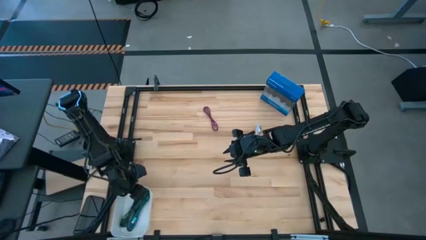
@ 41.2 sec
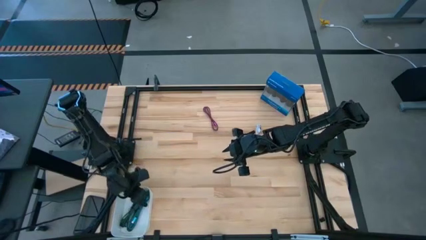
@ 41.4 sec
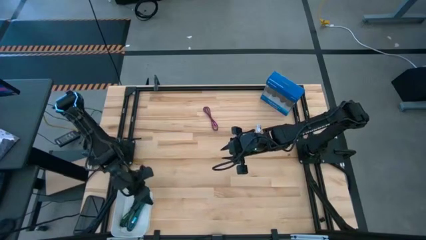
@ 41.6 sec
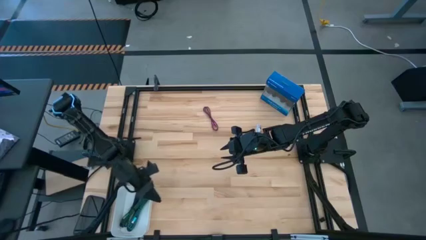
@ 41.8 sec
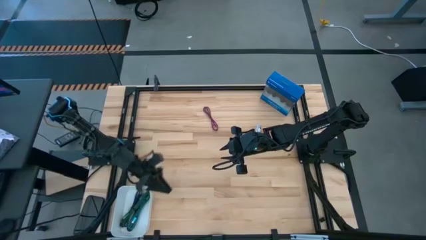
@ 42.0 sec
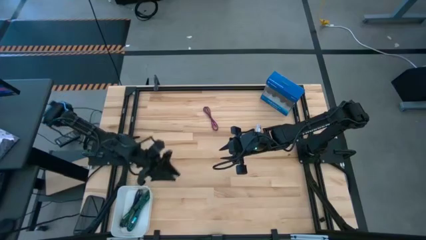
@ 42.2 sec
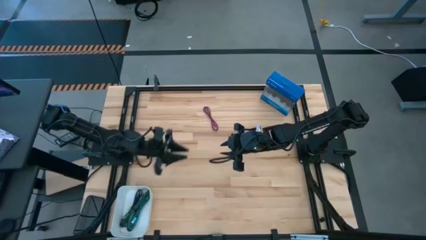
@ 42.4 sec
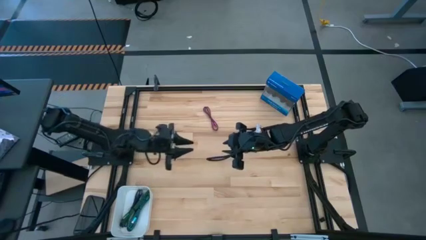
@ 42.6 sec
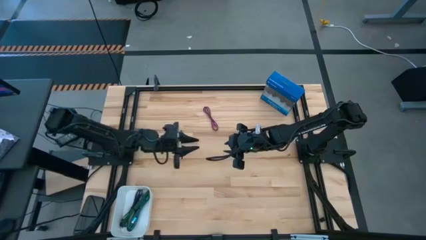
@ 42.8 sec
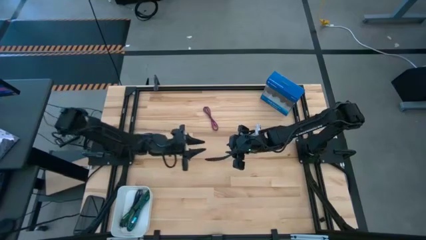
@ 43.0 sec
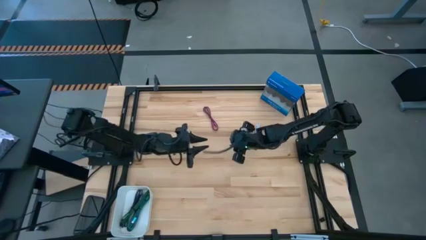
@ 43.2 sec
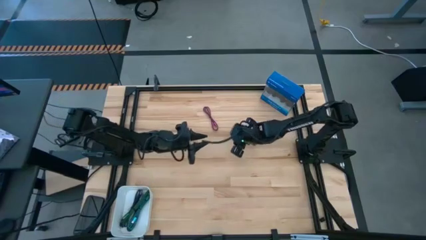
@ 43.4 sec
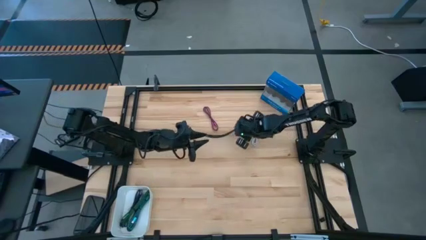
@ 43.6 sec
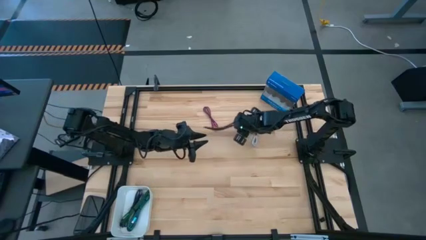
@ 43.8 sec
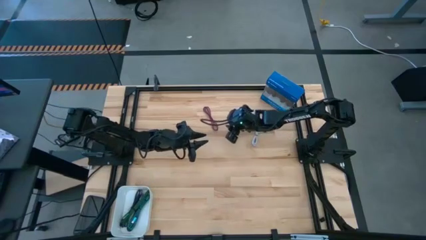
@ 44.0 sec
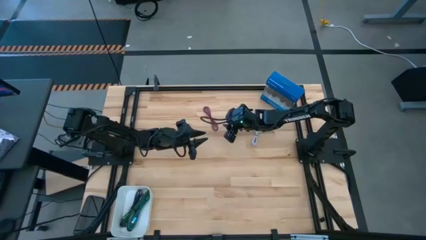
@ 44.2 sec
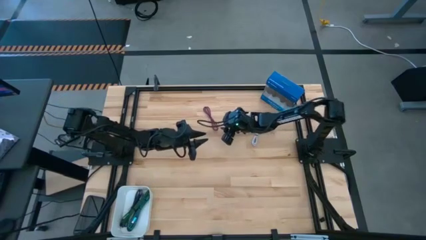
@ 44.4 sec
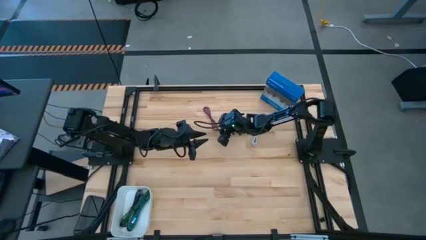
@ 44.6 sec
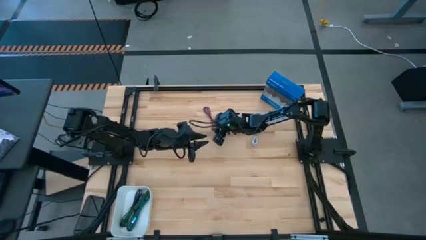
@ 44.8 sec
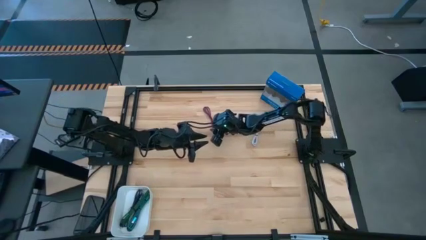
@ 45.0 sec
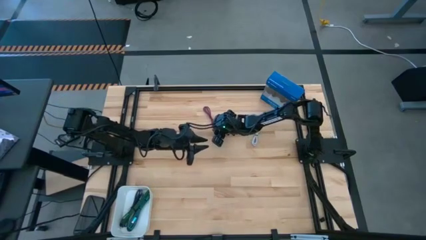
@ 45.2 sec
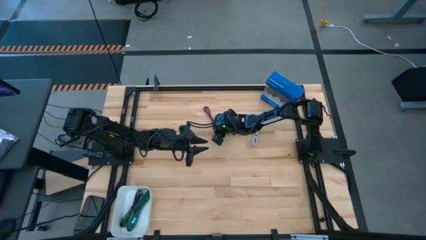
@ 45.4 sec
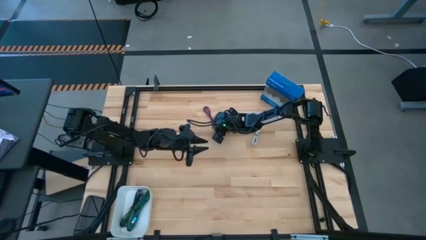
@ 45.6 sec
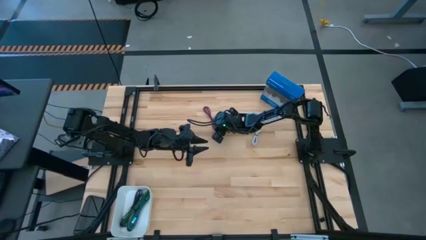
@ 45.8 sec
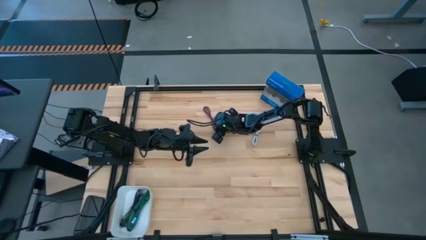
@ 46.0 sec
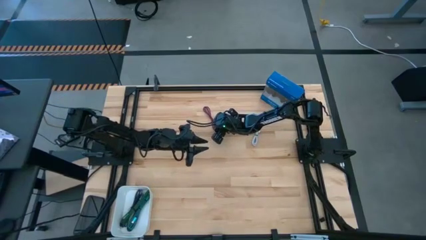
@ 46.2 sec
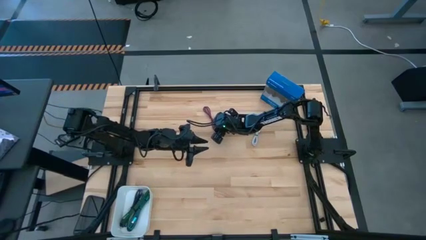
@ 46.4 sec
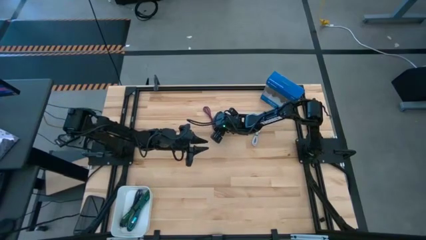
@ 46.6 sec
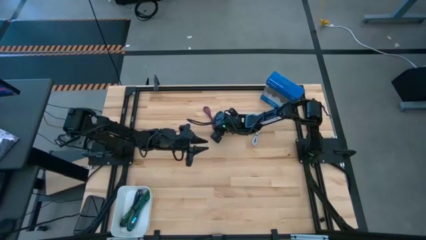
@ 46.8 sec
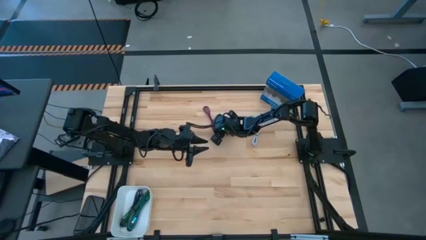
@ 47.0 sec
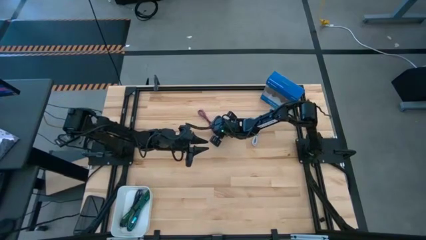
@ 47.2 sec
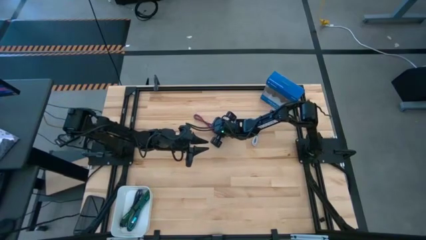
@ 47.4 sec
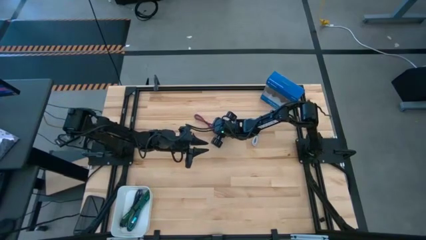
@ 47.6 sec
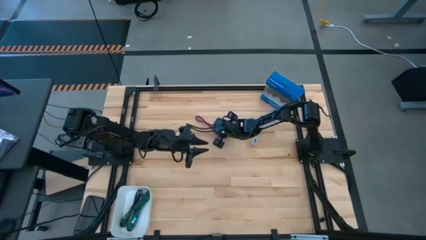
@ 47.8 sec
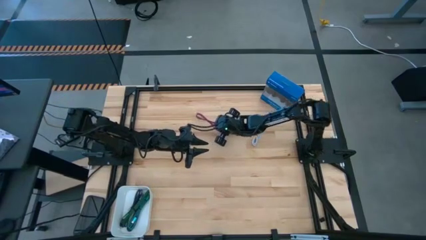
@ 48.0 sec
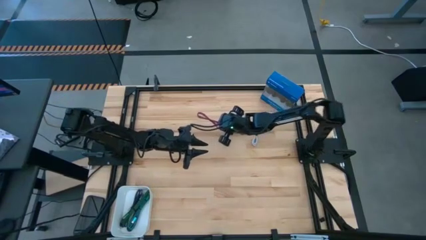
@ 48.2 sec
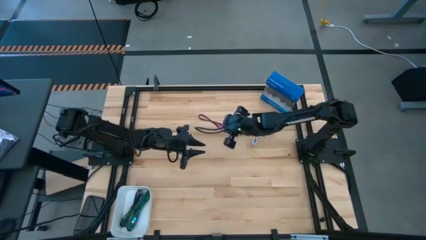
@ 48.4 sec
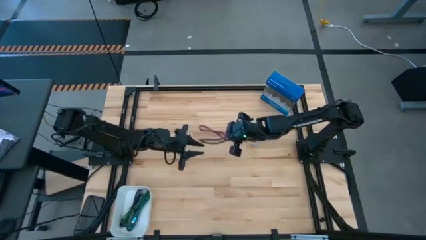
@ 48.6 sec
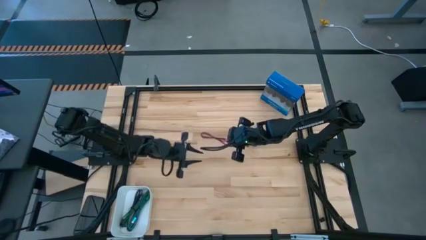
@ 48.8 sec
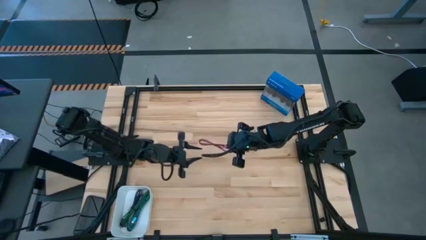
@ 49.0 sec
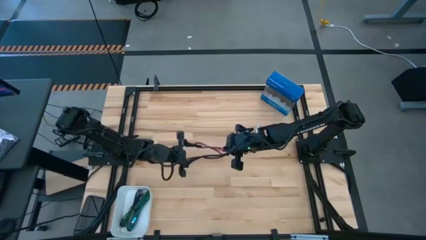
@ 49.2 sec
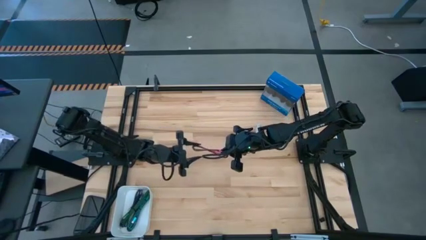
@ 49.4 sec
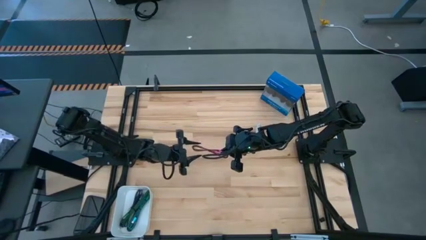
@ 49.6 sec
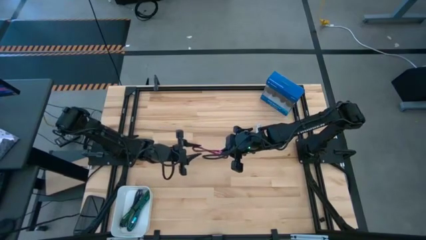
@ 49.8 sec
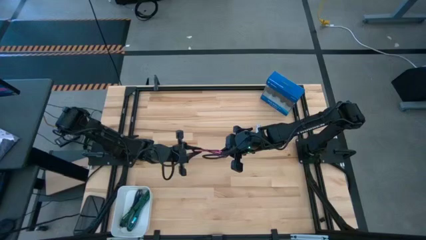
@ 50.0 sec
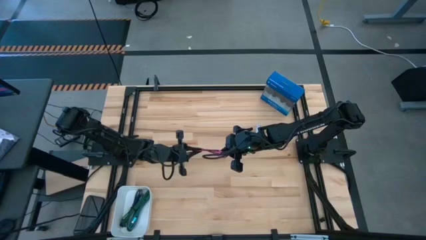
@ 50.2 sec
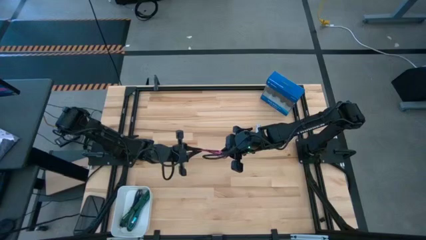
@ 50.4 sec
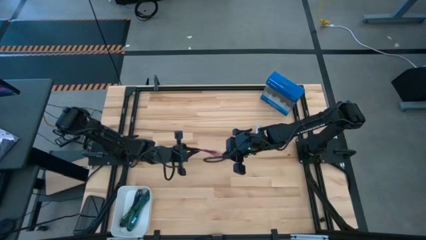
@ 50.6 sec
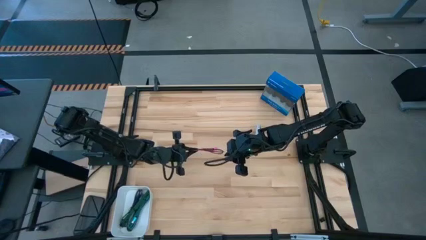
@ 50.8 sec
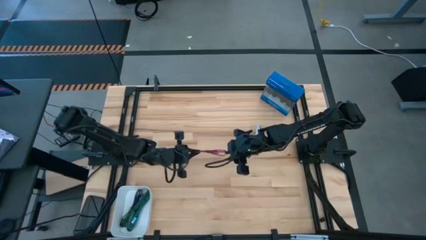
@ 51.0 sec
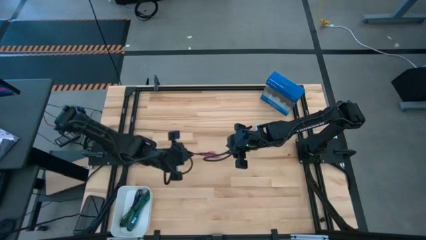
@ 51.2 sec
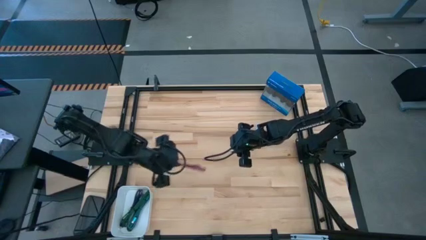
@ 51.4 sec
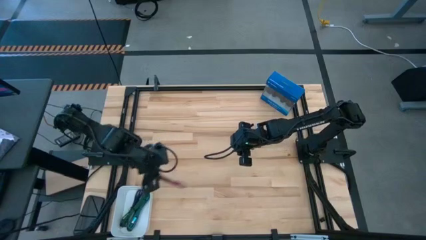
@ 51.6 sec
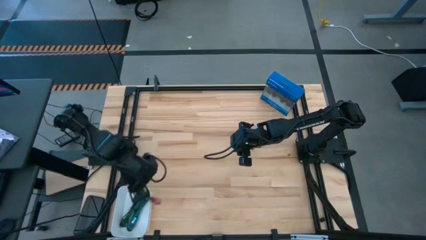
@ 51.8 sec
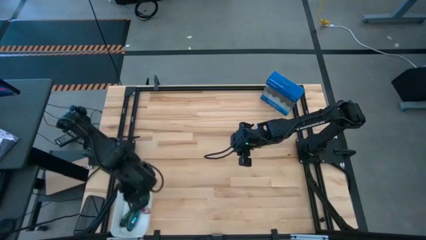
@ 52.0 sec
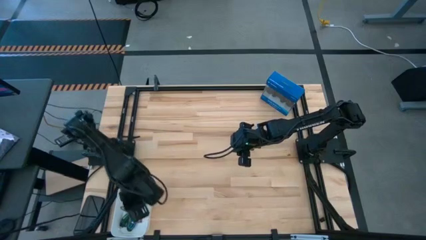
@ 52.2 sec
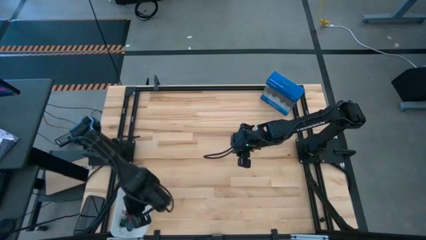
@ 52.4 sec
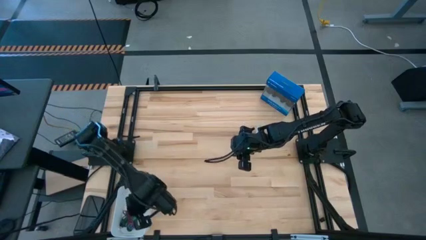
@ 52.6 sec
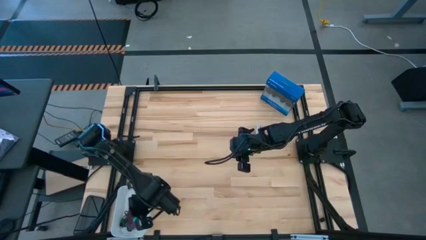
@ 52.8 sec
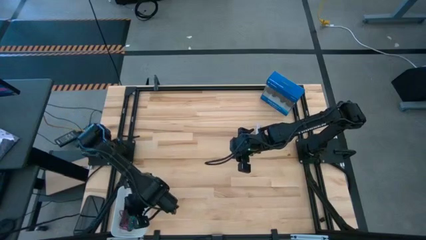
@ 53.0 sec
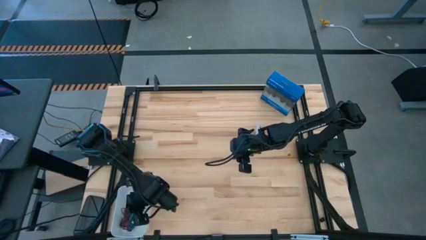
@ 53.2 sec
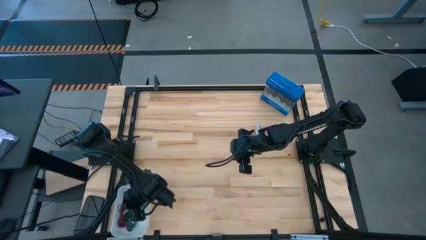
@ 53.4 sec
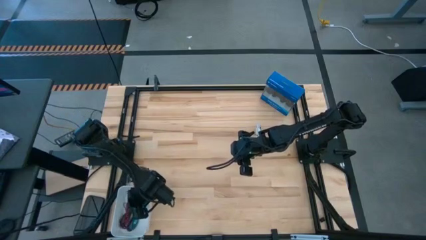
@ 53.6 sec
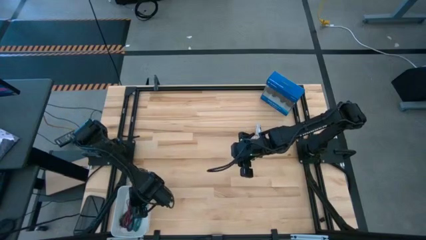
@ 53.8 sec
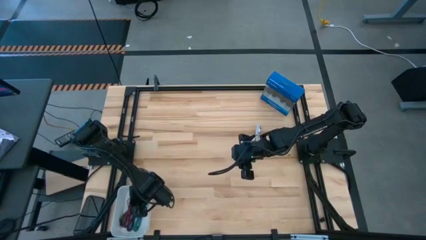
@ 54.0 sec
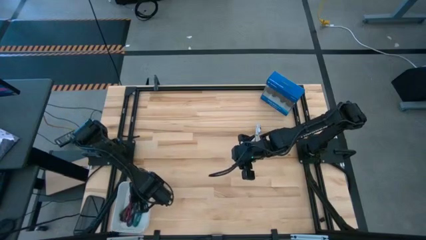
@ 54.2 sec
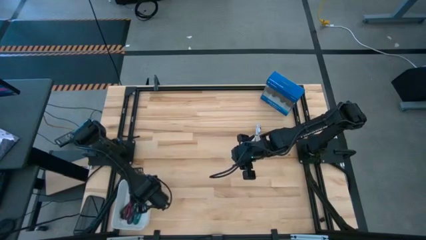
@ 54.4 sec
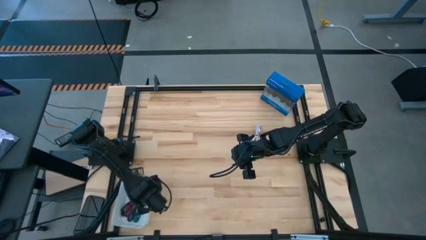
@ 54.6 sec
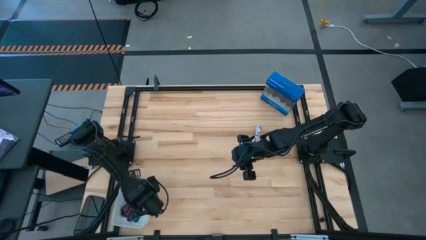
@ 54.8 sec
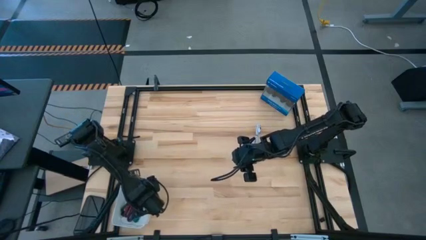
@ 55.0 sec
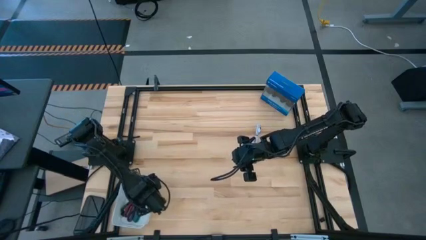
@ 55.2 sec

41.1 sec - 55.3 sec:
Task: Pick and place USB-C Cables
Put the pink charger cable into the white bin

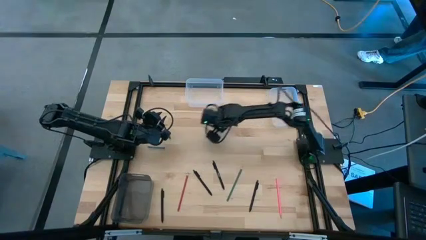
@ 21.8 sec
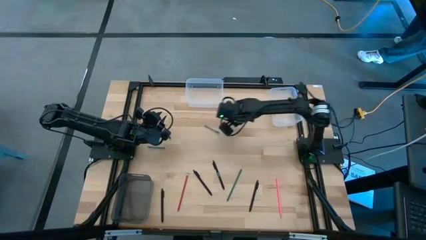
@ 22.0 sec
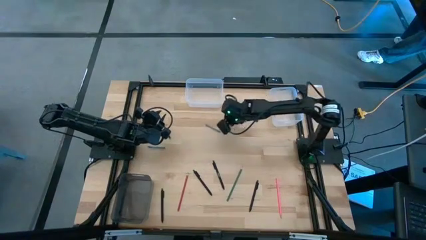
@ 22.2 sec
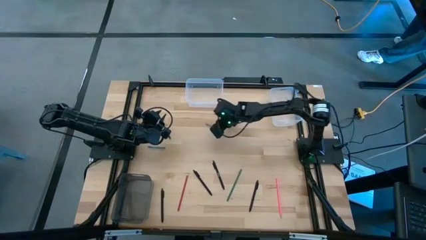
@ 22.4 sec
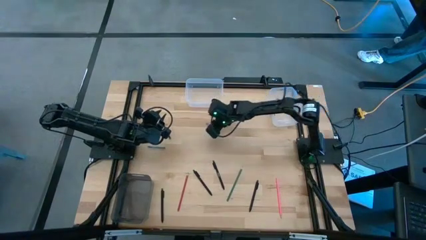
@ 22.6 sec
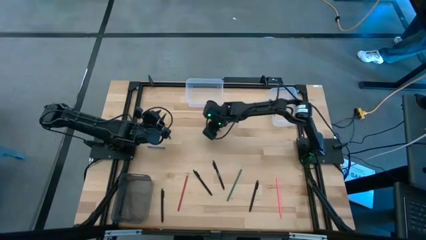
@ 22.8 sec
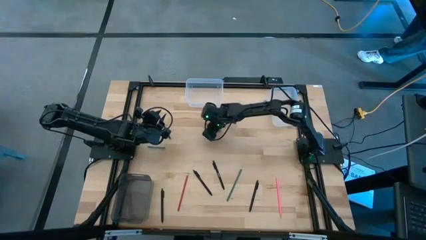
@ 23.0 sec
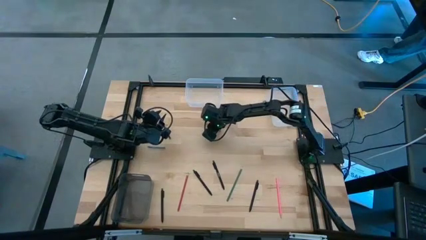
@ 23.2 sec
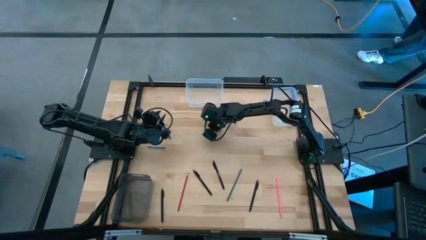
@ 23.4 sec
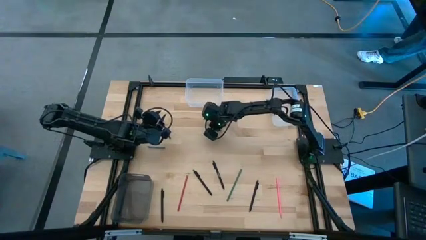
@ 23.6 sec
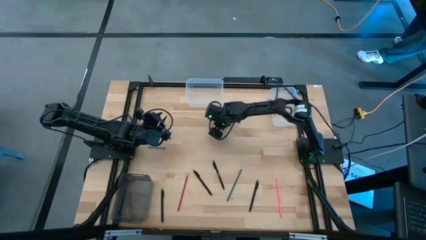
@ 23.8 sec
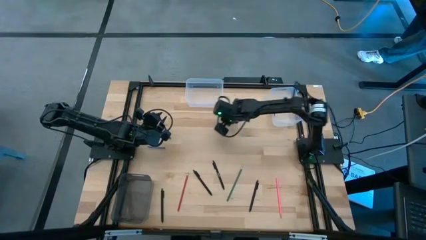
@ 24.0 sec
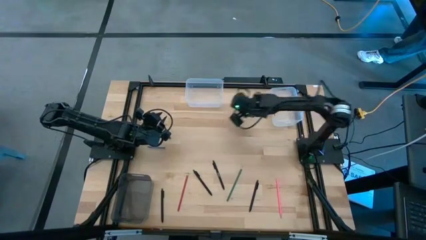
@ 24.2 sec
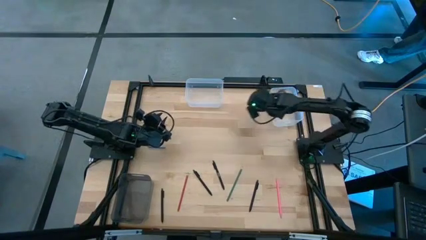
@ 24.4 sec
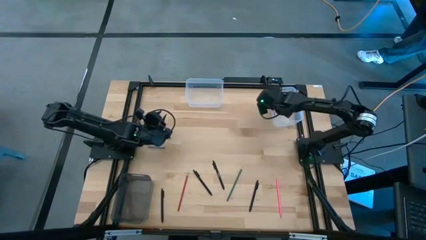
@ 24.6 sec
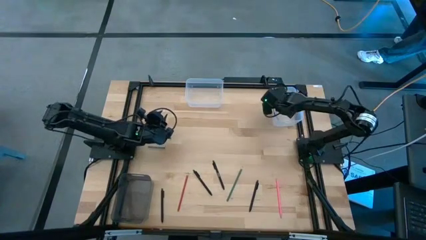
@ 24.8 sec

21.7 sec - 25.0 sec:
Task: Sort crayons/erasers/pens/pencils in bins
Put the top gray crayon into the right transparent bin
